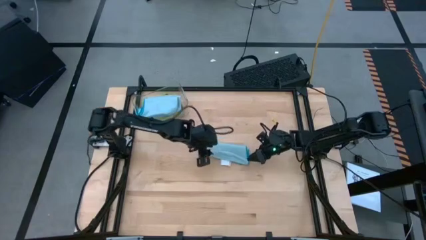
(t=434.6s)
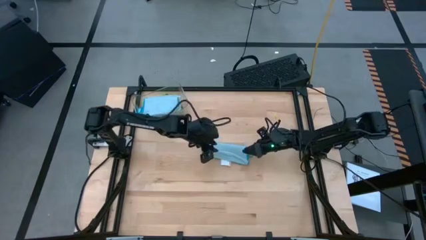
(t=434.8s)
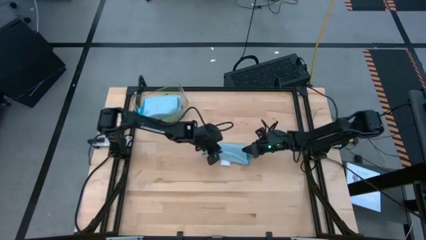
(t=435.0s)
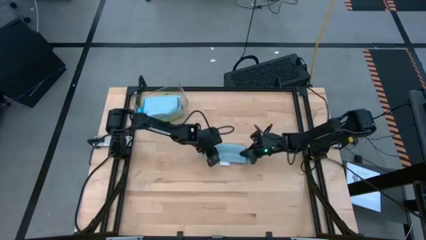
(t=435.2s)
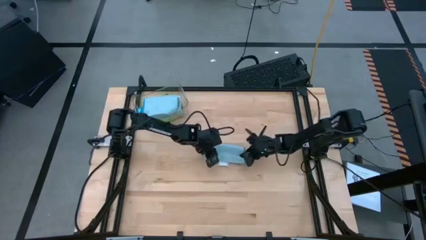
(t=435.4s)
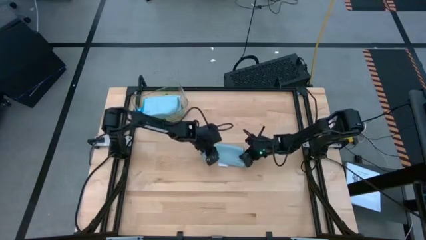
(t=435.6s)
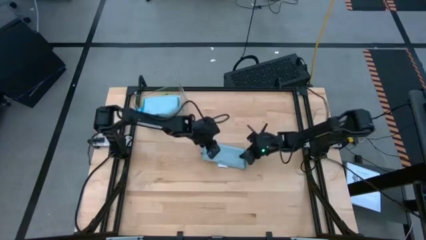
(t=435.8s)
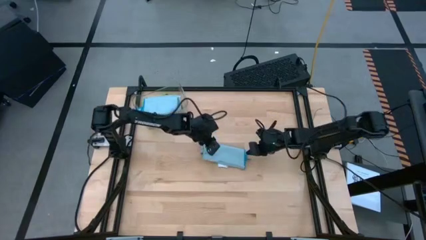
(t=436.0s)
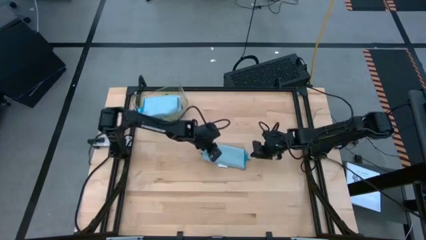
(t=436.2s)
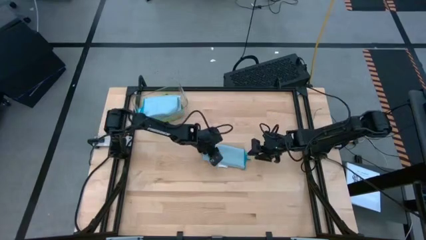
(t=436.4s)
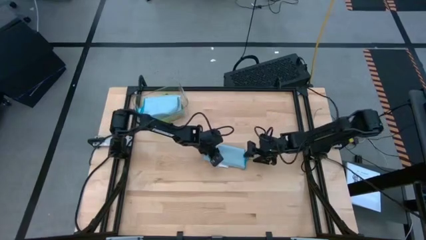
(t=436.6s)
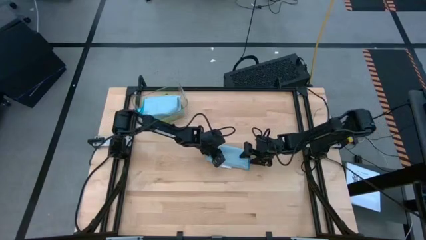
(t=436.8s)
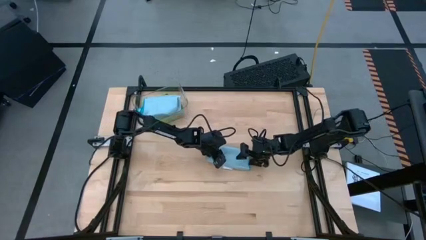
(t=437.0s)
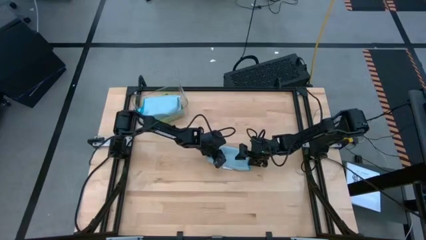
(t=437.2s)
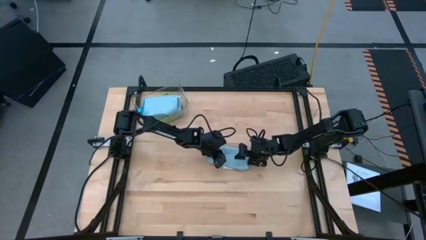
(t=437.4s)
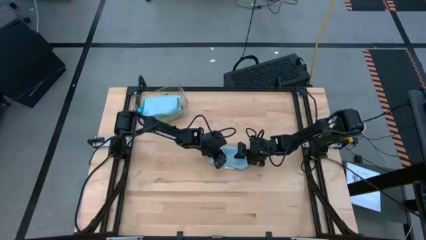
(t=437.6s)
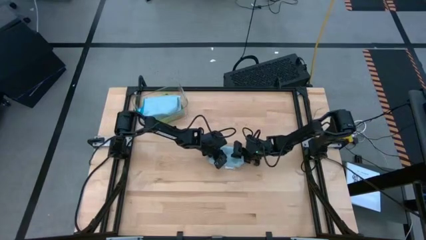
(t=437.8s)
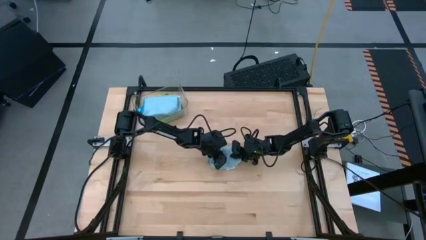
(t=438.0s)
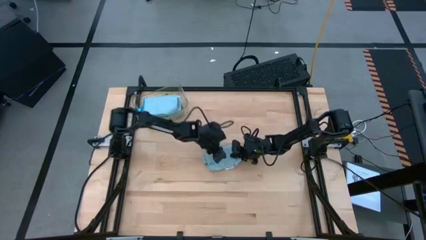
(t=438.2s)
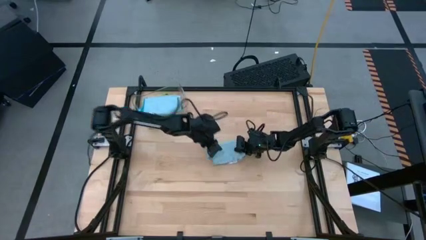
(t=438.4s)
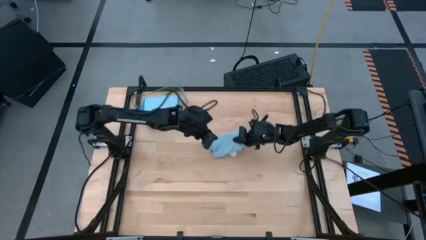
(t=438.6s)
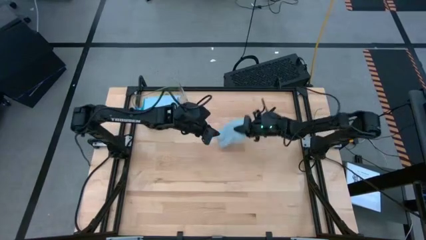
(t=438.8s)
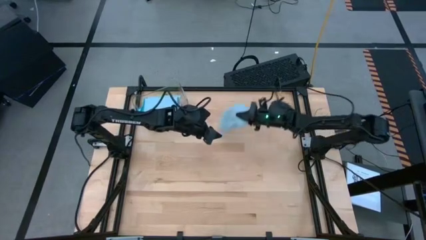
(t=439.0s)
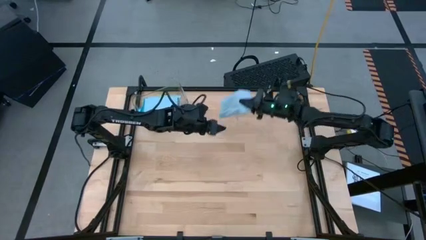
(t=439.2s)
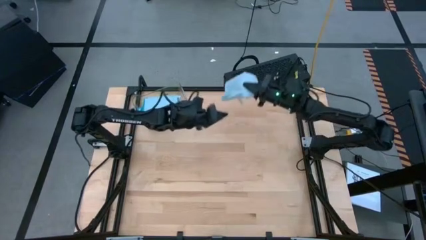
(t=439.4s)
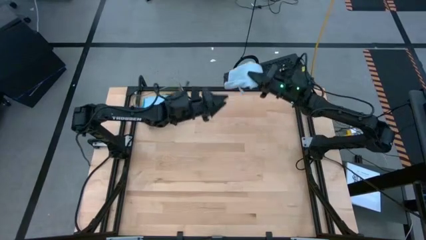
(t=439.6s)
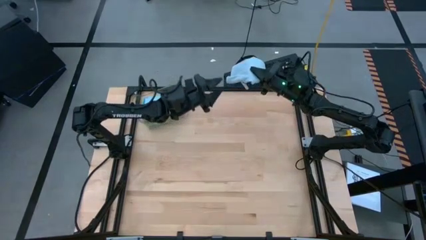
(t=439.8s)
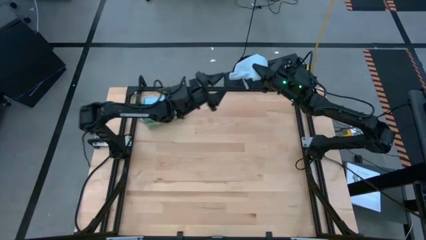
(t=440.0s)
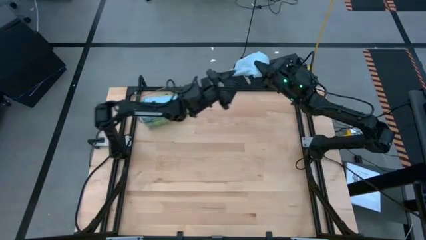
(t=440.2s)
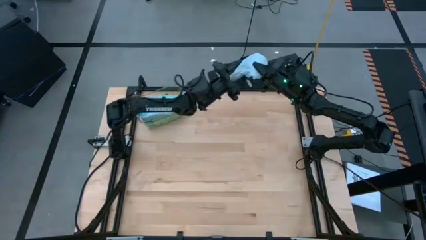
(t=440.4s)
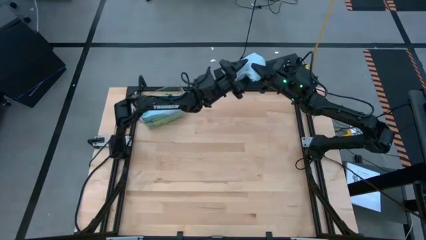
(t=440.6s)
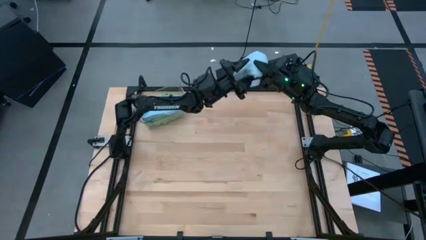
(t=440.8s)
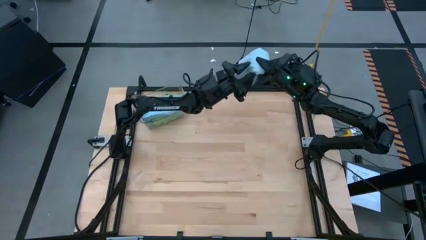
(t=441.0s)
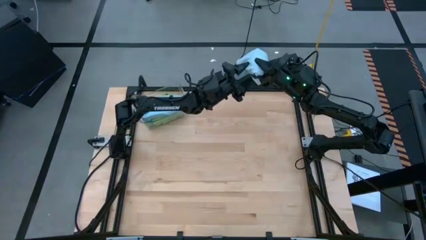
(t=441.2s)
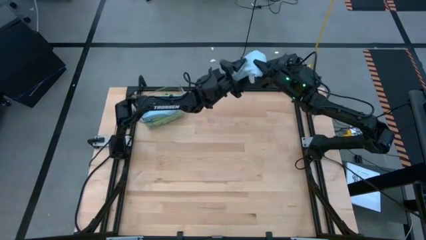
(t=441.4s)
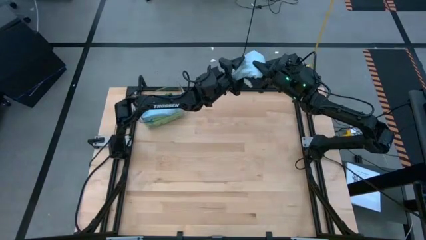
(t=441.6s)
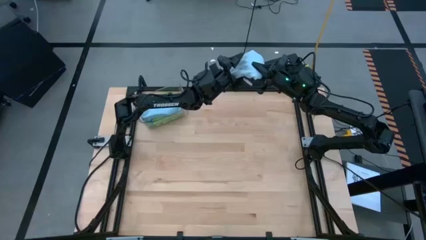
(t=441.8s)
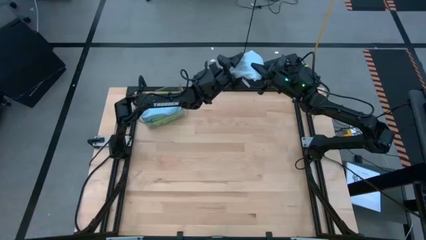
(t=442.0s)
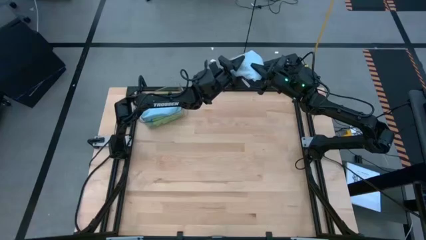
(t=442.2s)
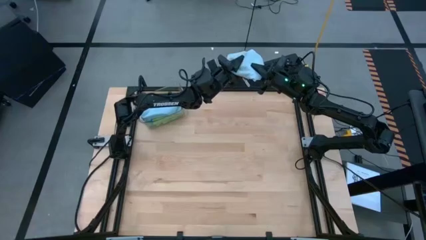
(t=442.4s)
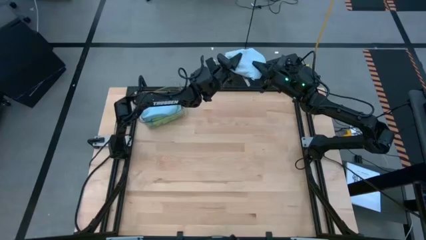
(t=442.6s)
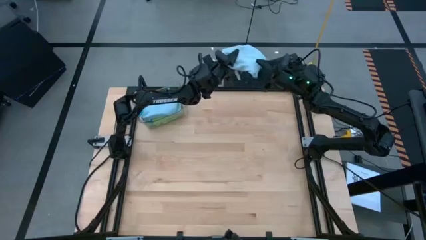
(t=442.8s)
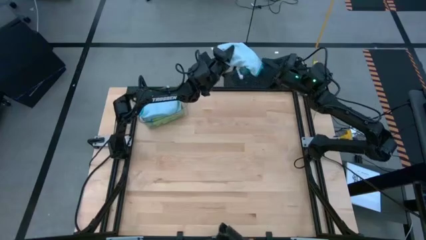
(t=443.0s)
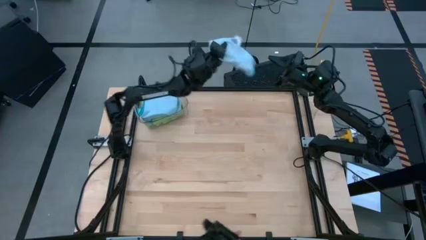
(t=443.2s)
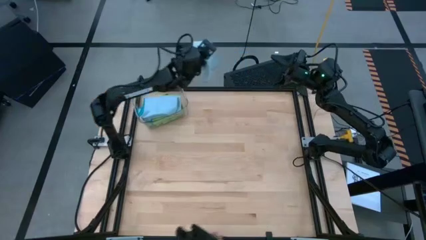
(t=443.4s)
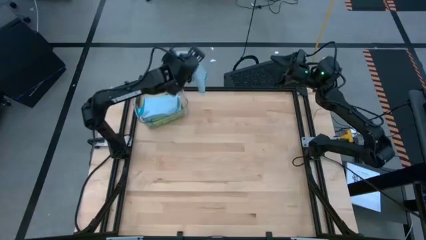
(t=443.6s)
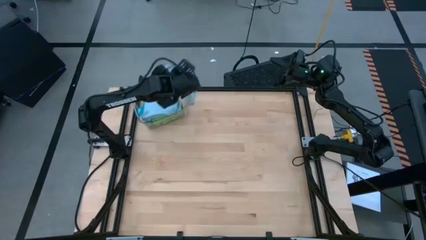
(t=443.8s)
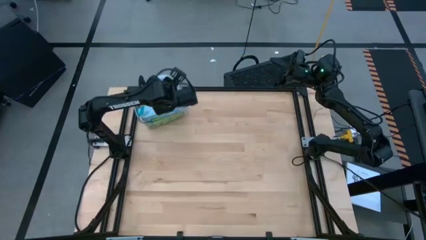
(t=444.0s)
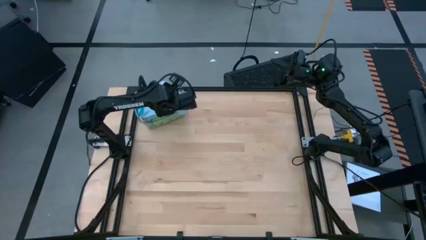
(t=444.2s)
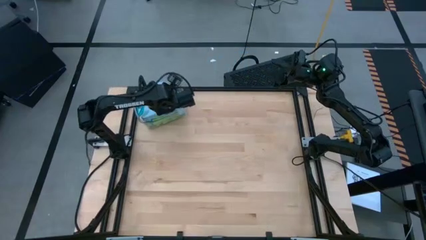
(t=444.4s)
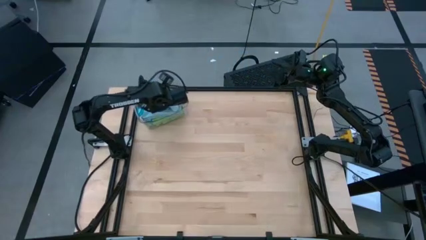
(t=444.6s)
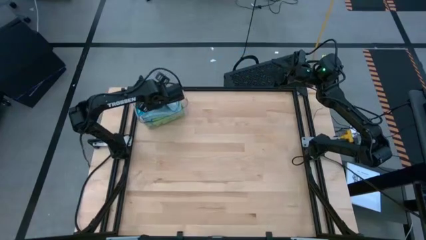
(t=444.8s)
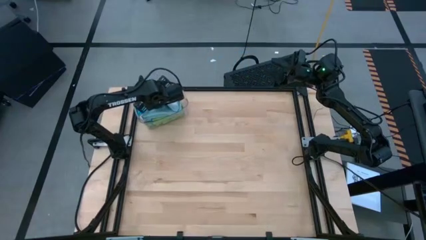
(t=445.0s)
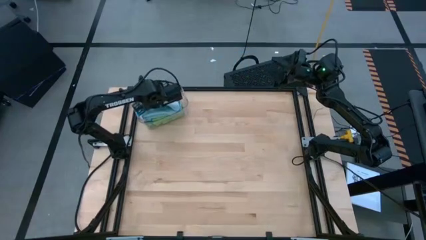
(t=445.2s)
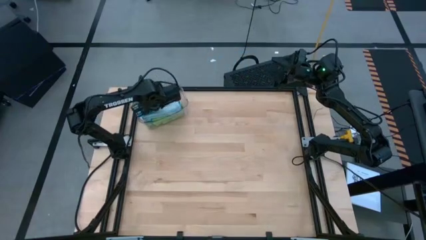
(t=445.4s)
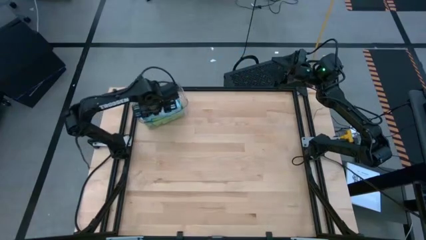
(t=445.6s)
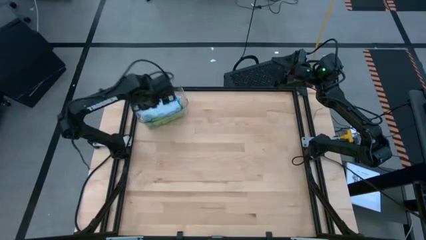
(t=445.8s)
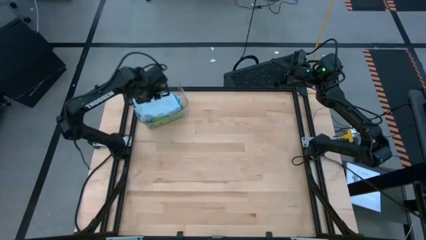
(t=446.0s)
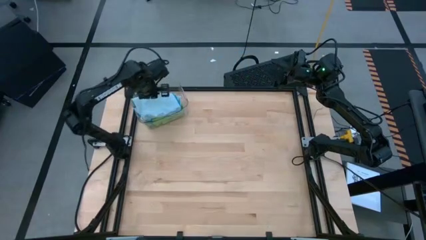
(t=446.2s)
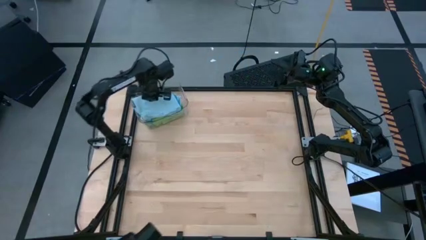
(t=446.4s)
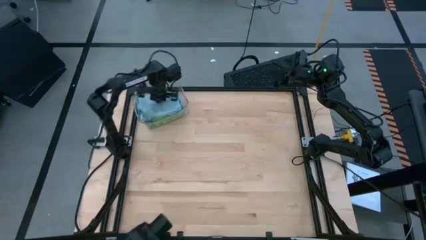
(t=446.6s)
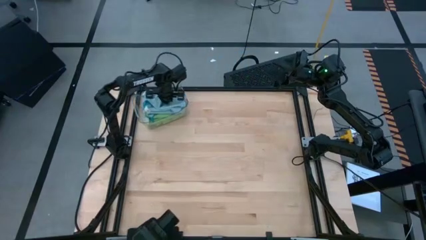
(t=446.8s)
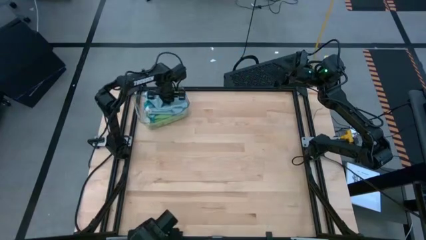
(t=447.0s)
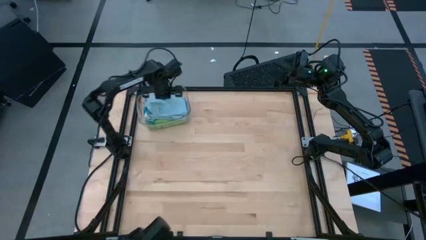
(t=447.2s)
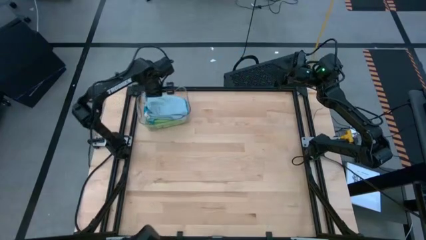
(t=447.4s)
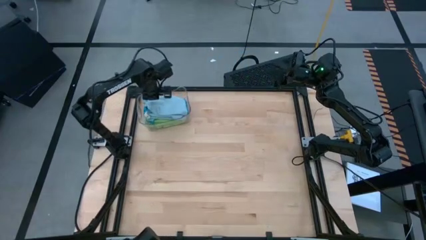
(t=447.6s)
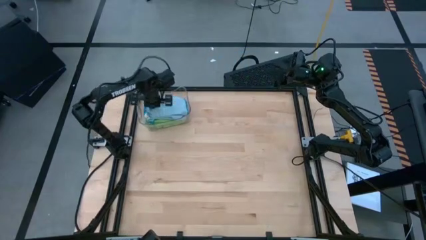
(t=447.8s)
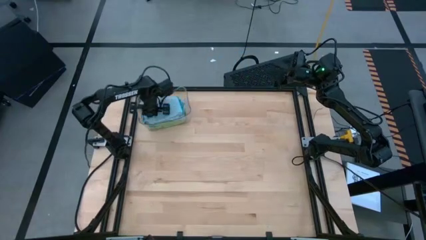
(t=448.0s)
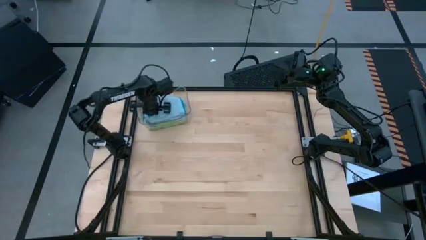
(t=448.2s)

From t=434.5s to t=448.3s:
Task: Fold microfiber towels
Stack the folded blue microfiber cloth on top of the blue microfiber cloth on the transparent bin

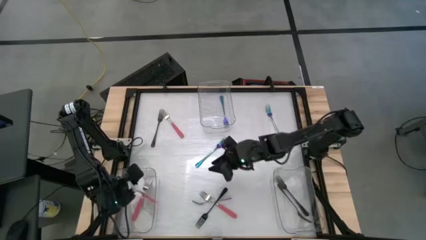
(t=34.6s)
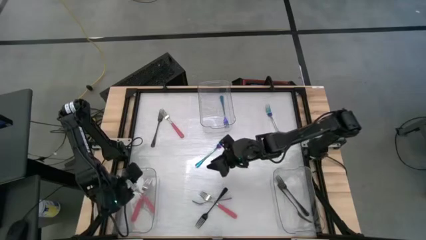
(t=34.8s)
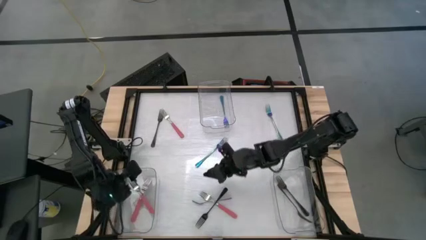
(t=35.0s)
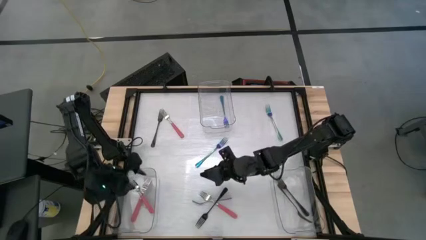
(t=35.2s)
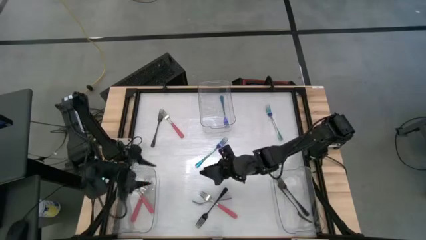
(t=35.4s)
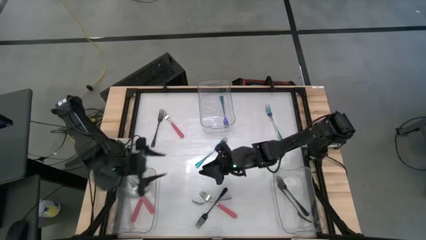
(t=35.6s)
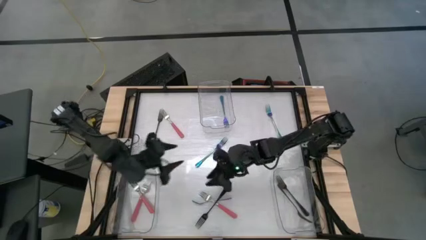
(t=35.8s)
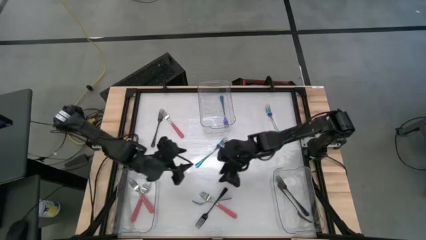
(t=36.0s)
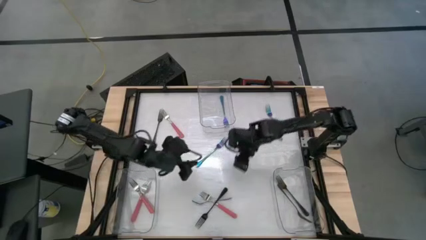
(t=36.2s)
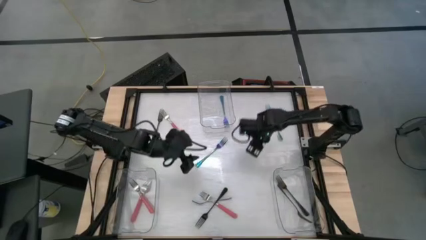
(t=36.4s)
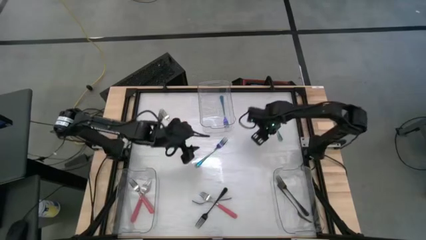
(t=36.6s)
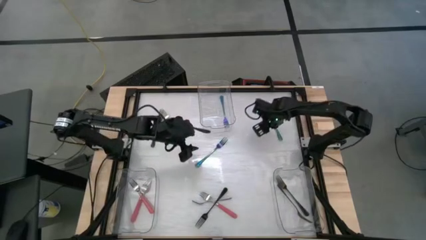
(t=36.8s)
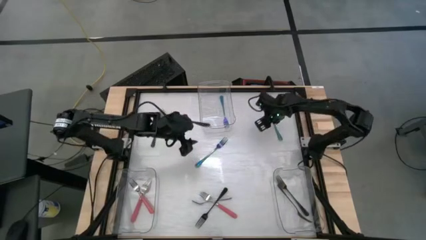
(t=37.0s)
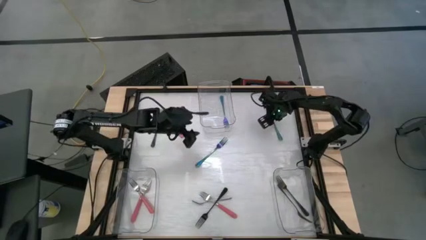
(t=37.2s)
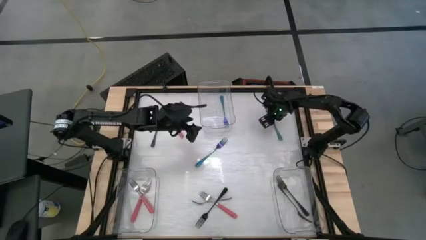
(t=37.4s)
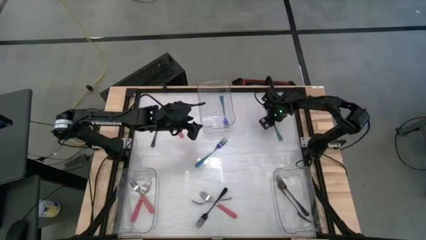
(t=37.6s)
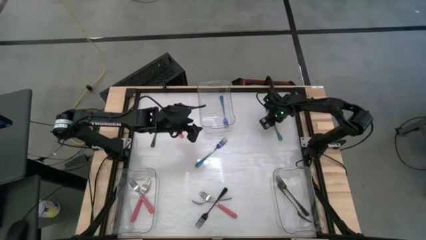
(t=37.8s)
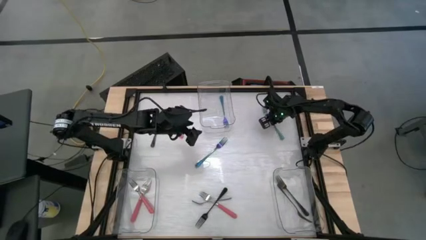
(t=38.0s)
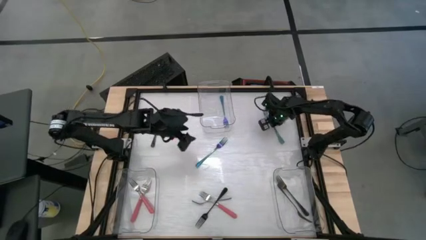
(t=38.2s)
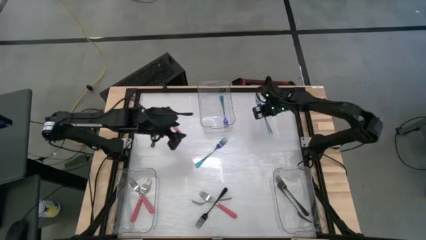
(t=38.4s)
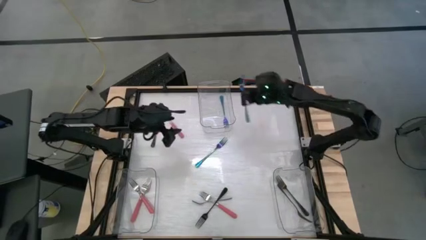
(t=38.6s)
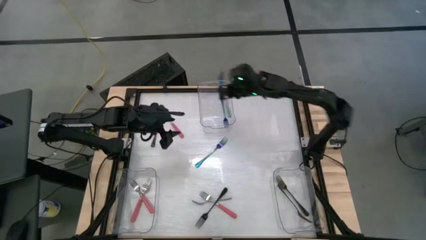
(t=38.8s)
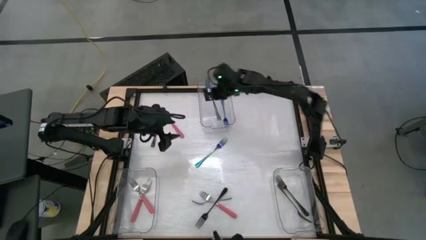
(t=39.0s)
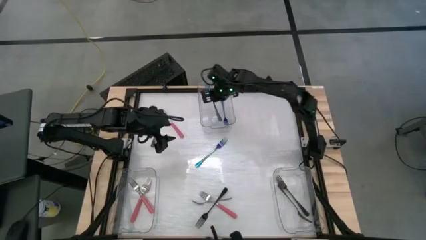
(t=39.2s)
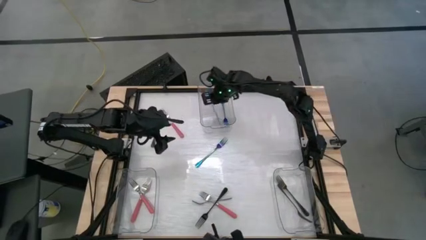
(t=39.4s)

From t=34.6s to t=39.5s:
Task: Sort silverware by color (type)
Put the titanium rainbow fork into the top transparent bin
